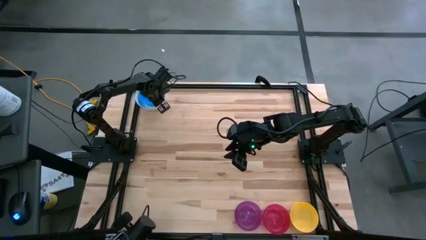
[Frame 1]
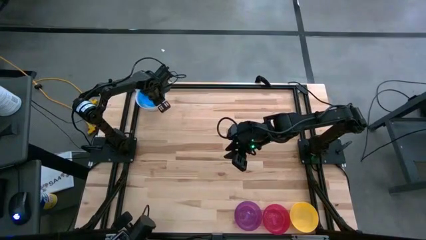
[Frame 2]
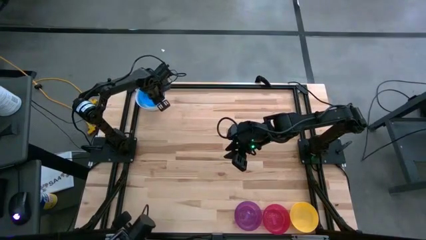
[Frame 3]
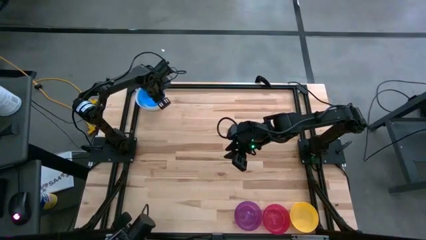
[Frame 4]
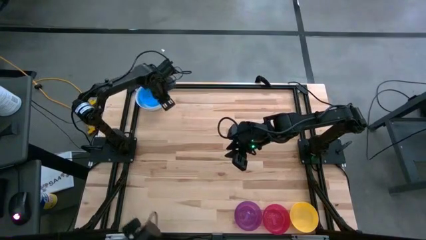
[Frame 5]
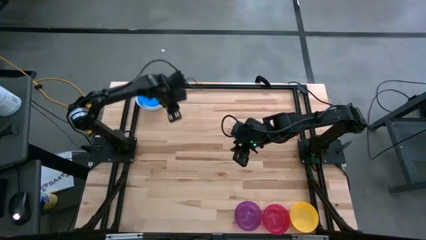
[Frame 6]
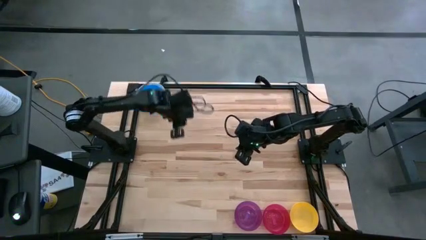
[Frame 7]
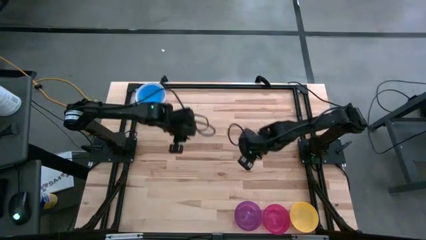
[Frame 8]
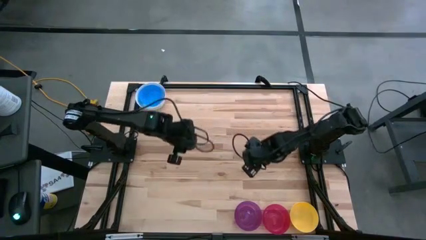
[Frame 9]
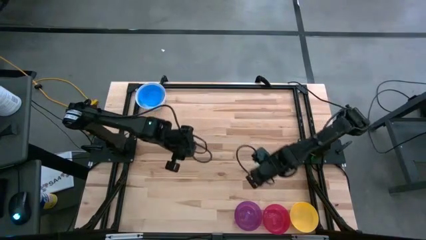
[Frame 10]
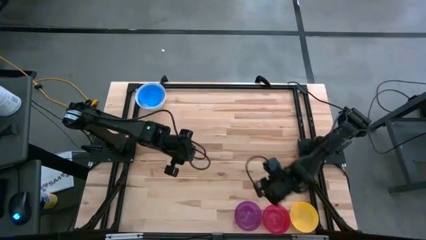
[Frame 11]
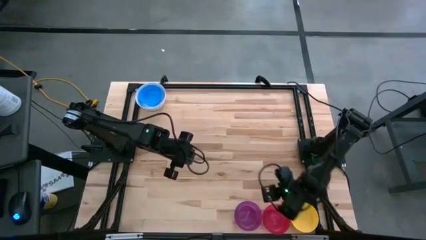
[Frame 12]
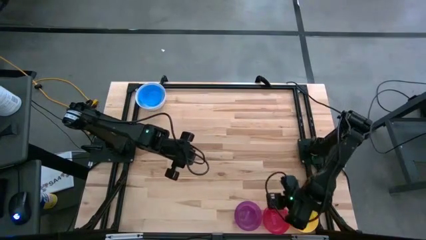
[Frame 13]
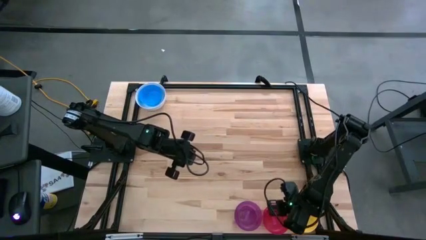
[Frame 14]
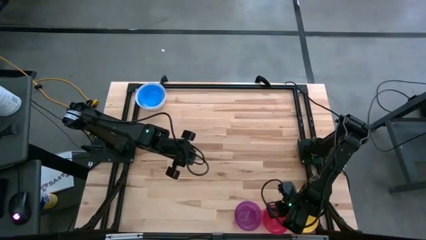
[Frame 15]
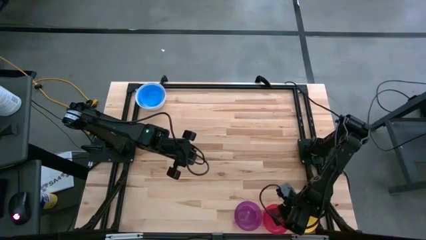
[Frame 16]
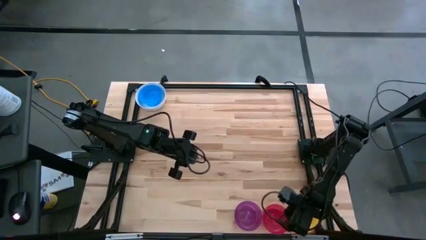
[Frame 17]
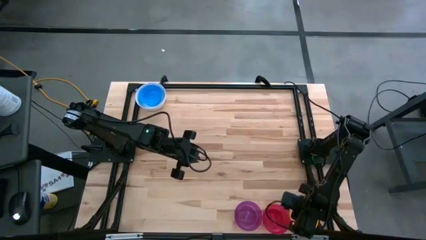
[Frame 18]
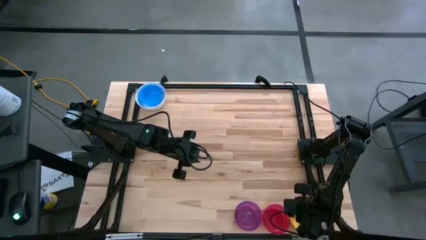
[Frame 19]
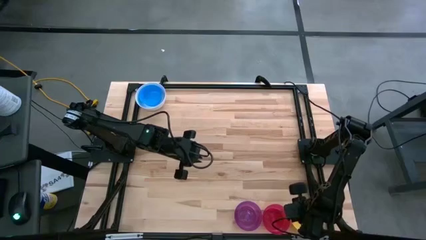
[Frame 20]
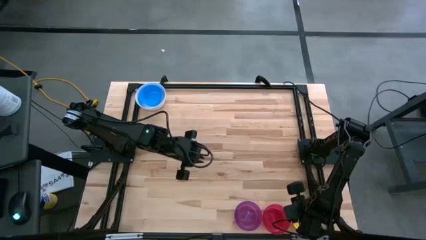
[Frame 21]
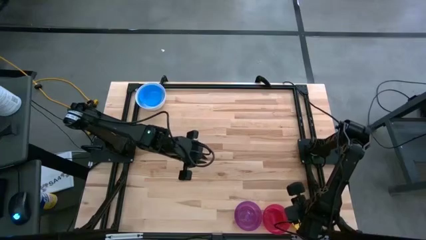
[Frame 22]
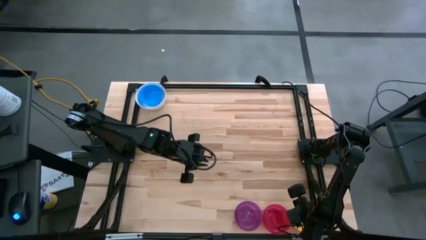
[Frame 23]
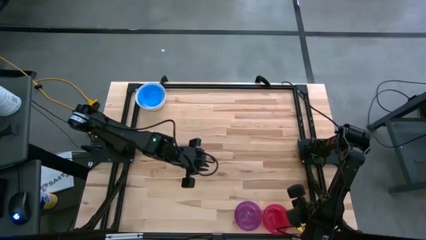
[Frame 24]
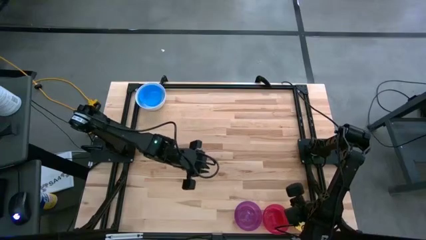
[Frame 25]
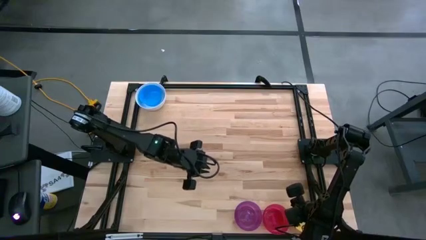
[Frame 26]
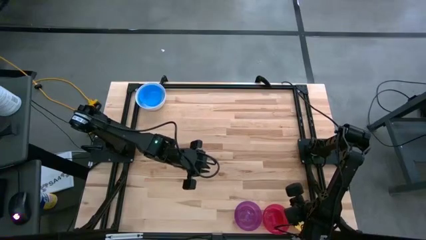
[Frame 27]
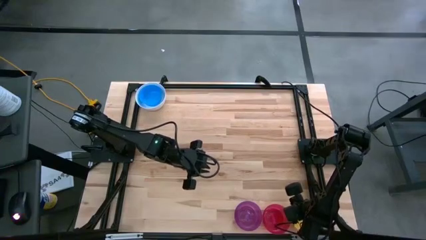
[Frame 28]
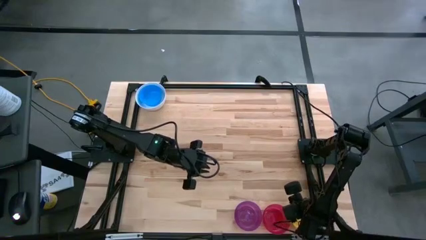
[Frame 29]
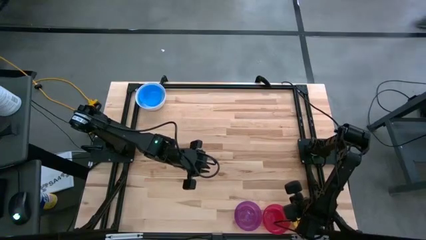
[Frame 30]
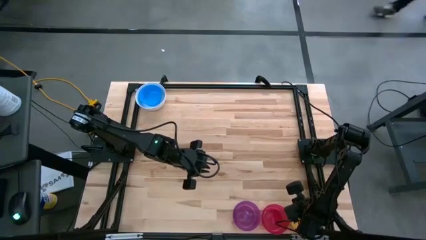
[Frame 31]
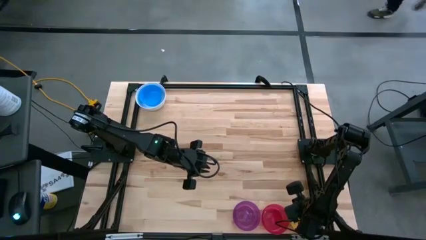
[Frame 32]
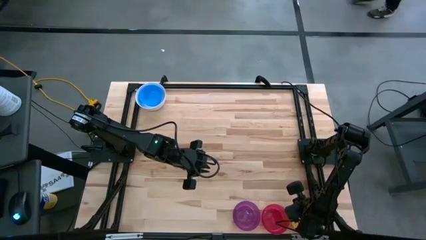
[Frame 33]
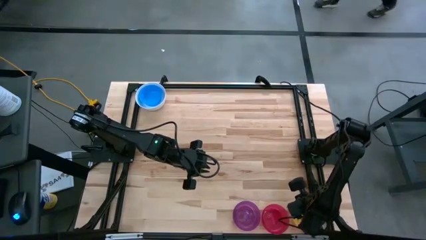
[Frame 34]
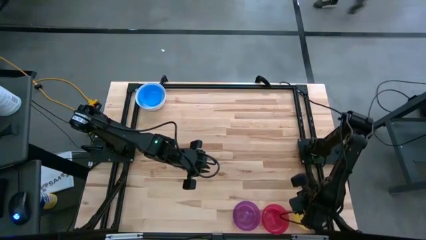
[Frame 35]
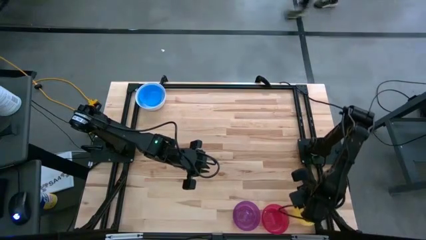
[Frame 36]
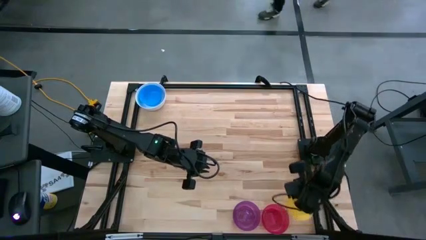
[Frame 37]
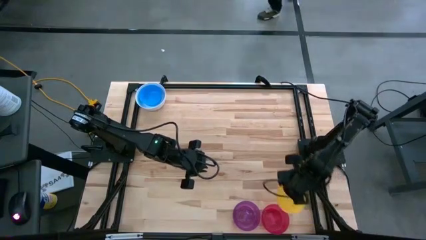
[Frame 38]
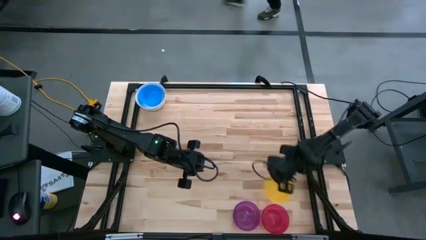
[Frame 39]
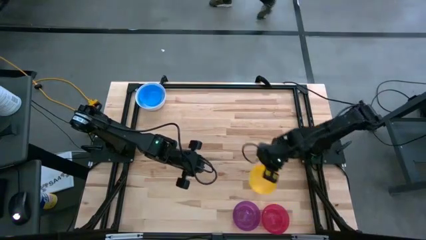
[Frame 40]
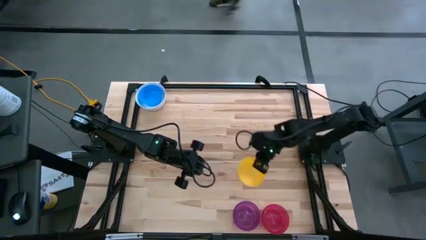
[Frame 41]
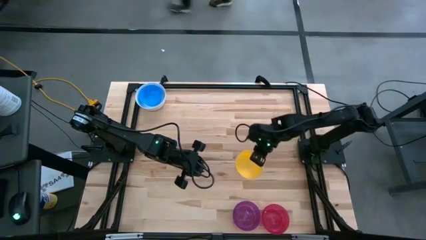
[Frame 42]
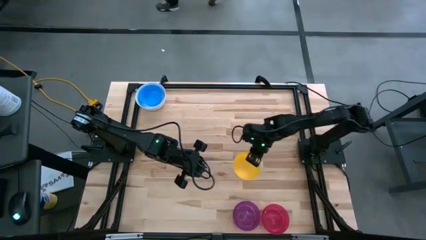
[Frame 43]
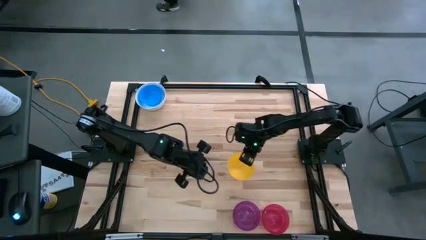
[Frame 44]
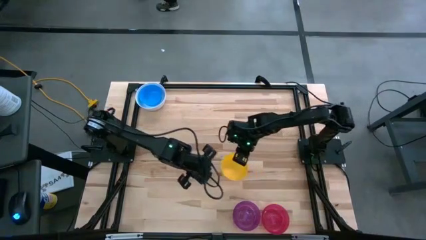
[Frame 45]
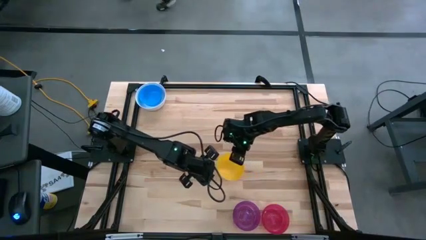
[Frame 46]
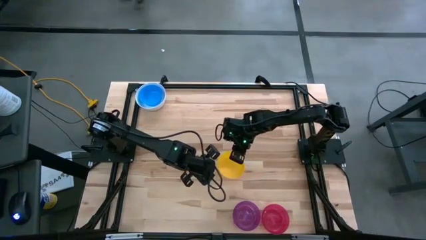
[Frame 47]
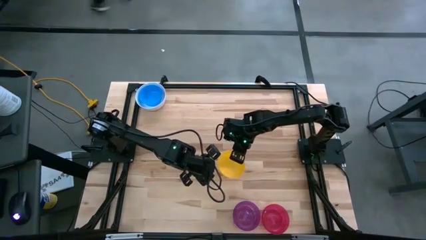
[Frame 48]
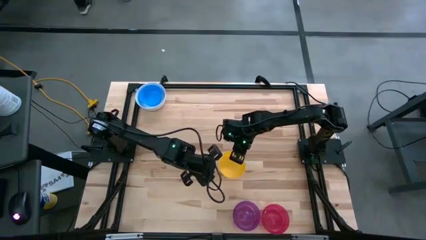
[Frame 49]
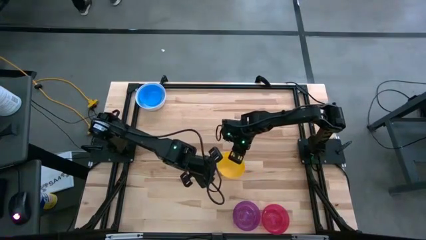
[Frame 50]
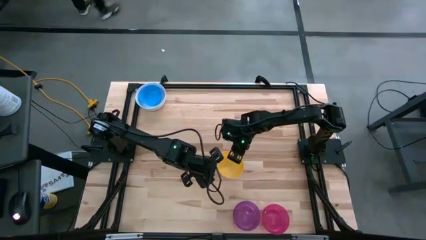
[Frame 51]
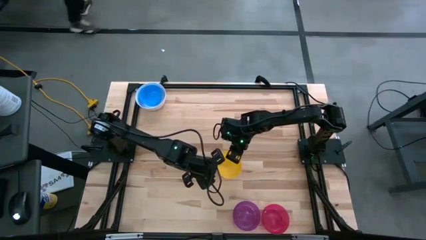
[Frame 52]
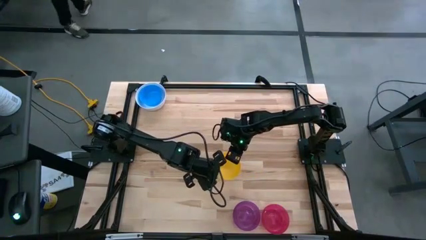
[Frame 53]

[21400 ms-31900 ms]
Stack the yellow bowl on the blue bowl

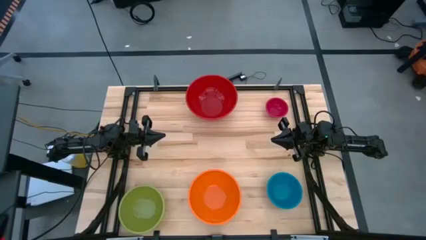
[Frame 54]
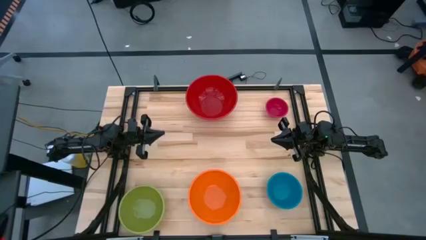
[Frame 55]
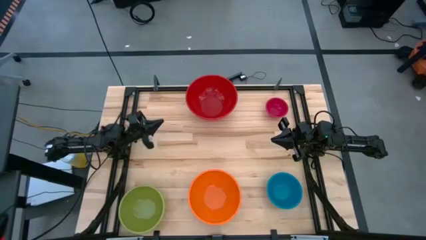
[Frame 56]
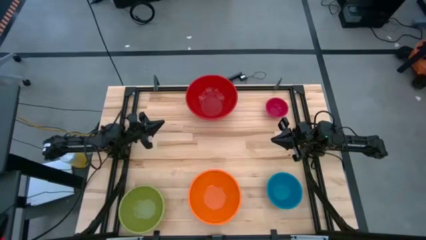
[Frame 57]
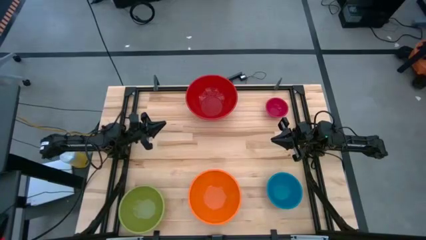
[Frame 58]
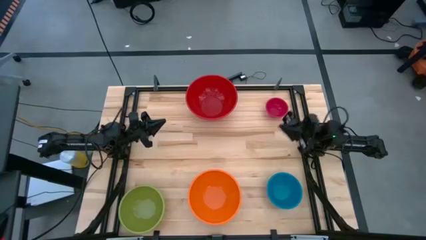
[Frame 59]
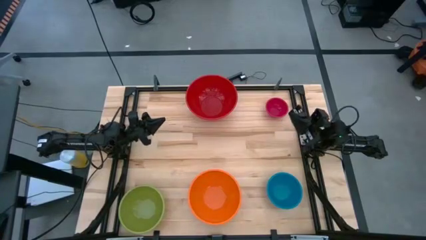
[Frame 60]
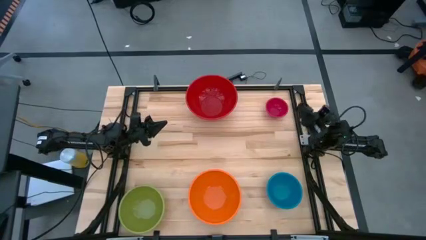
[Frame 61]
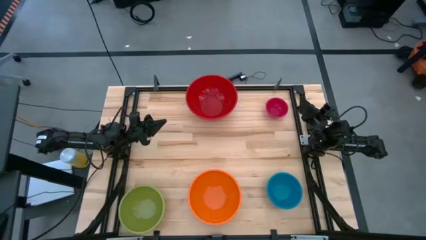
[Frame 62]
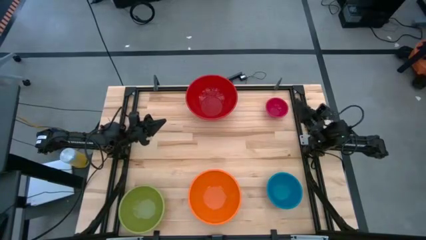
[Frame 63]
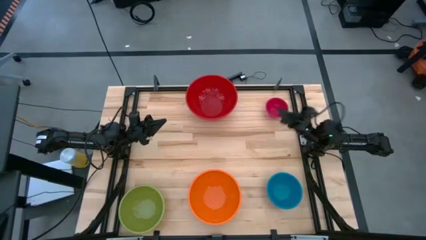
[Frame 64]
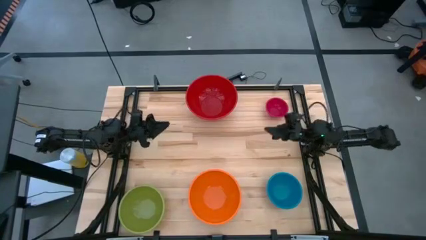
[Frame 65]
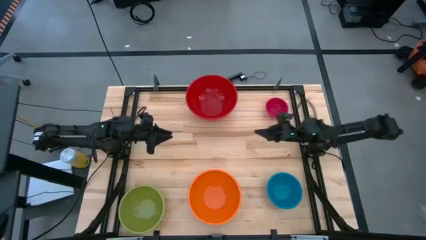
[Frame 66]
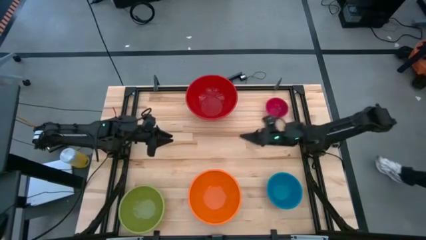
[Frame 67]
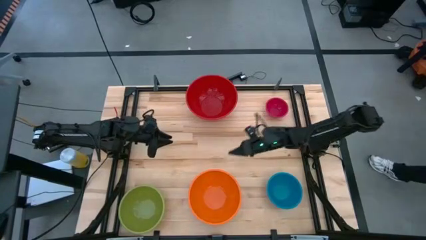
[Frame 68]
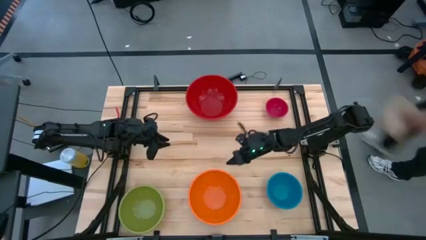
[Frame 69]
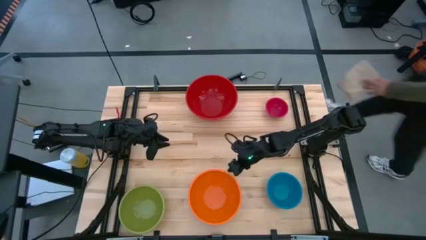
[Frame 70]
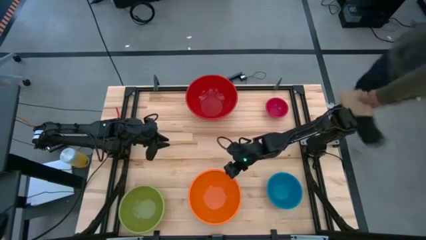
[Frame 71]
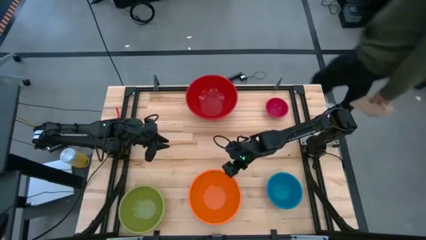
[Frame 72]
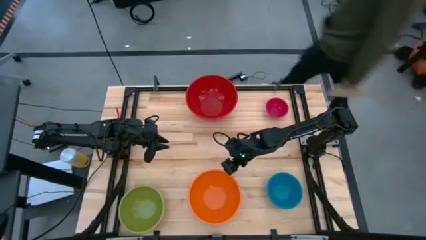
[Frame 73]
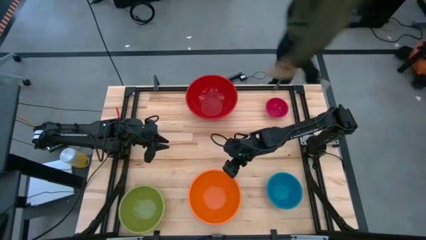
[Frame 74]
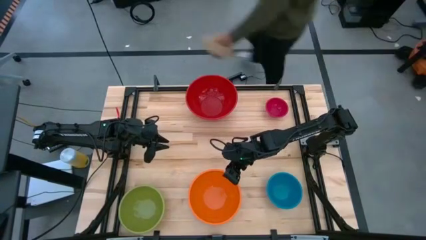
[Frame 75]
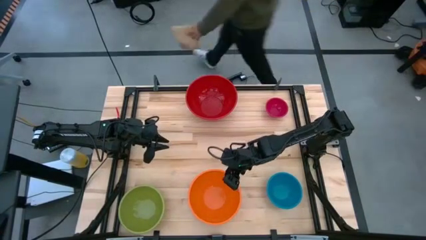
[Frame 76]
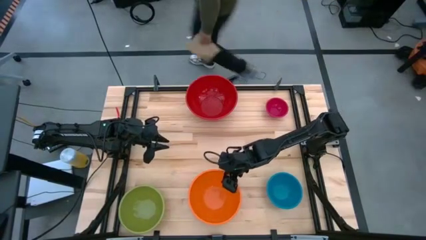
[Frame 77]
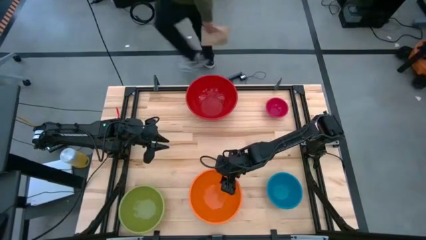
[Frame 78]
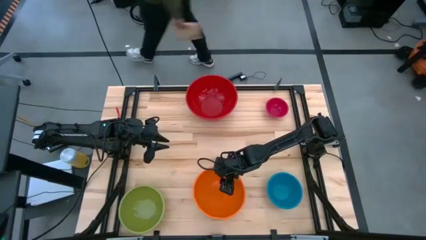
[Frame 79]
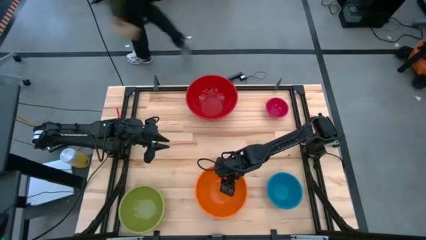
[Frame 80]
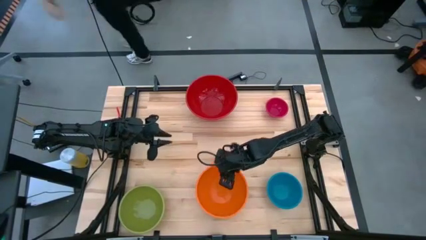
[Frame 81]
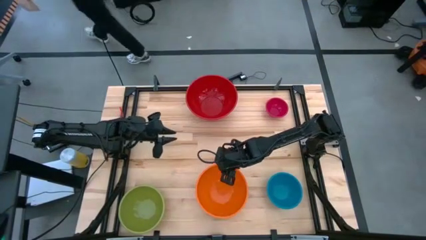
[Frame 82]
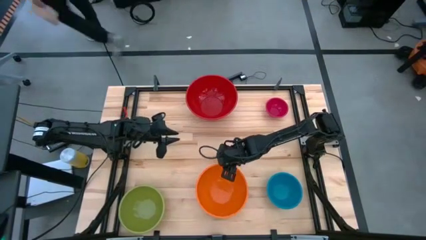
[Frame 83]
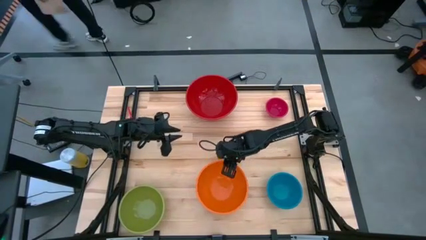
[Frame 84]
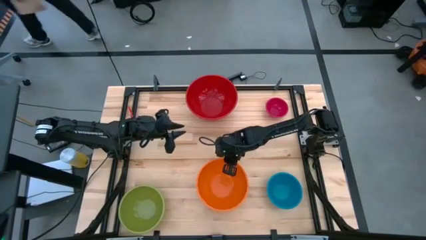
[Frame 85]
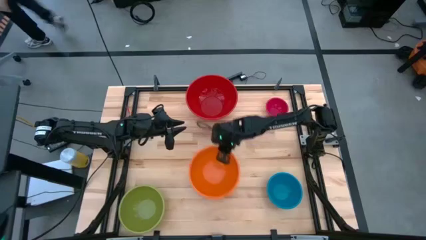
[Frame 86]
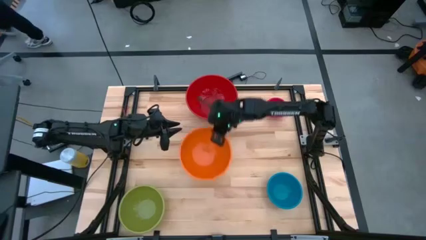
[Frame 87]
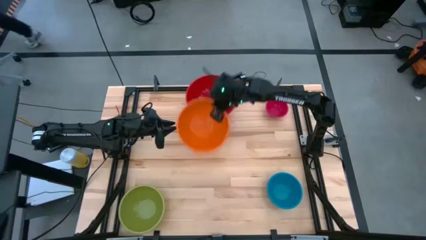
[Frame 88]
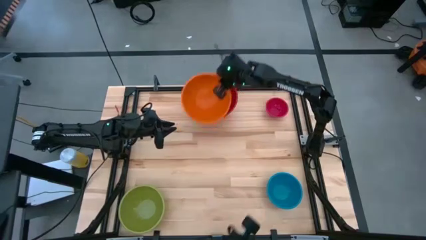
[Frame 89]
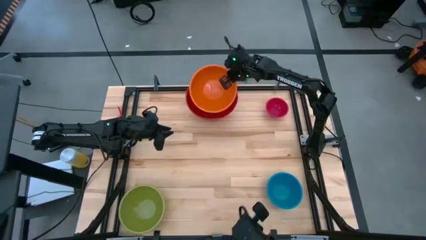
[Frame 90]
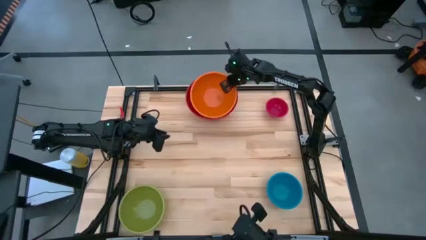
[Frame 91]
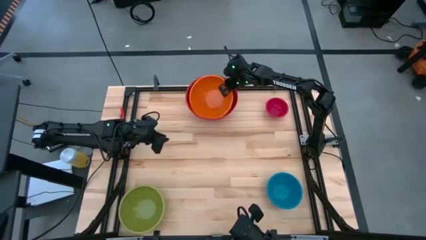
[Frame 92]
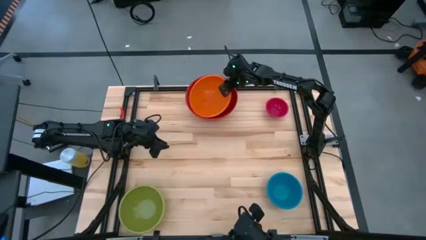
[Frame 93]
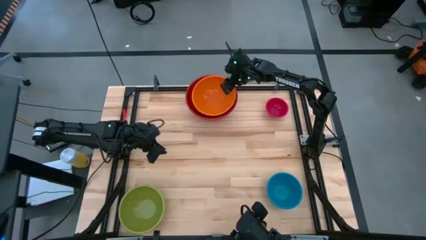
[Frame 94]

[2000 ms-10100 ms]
Stack the orange bowl on top of the red bowl
